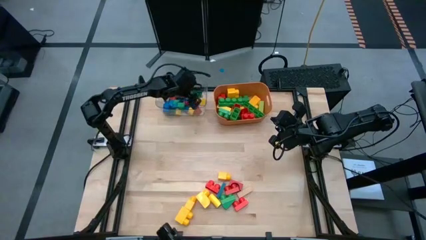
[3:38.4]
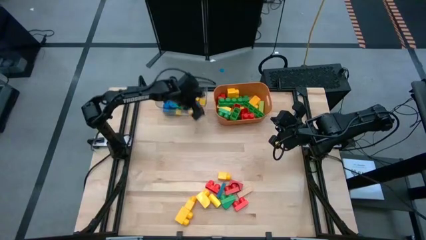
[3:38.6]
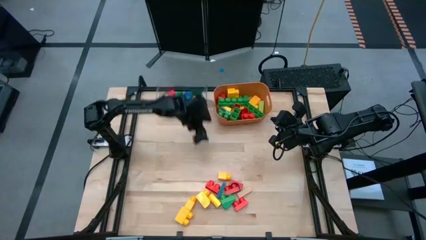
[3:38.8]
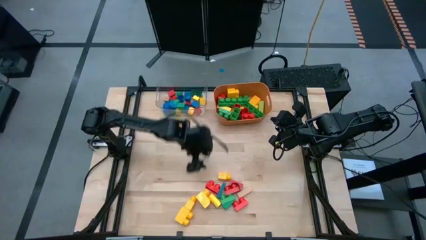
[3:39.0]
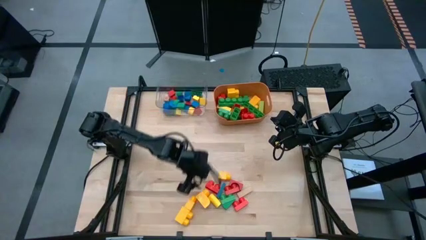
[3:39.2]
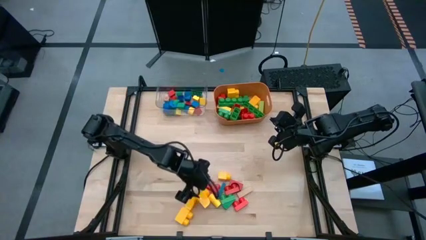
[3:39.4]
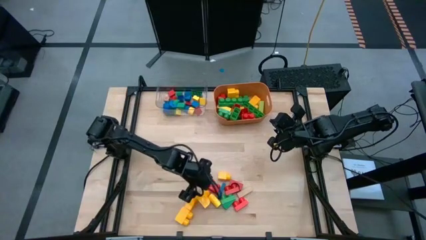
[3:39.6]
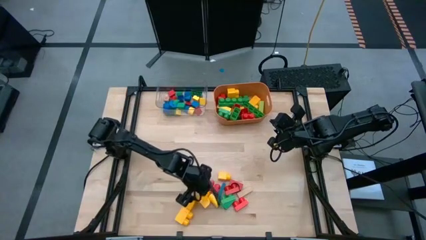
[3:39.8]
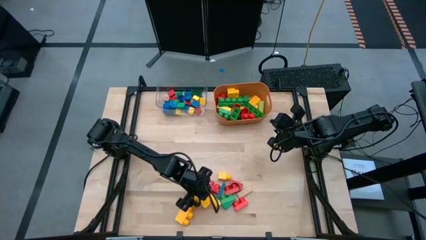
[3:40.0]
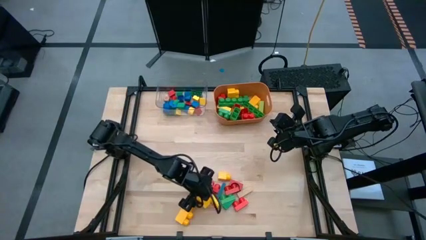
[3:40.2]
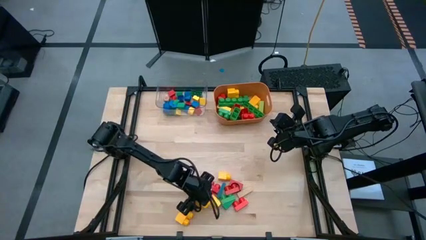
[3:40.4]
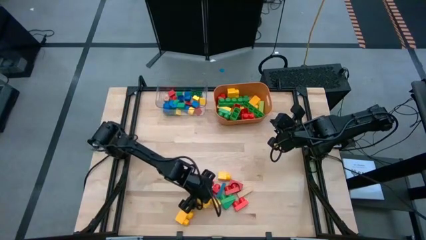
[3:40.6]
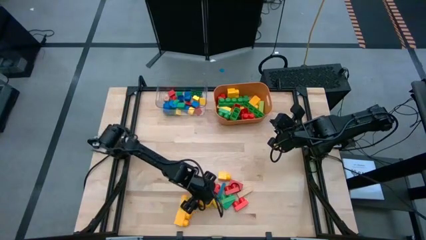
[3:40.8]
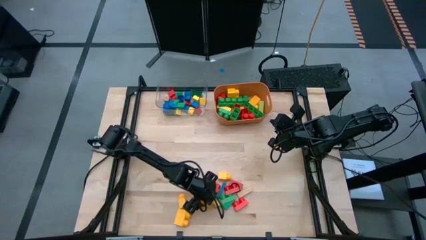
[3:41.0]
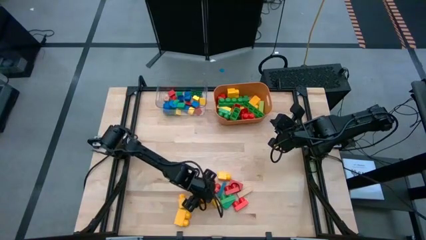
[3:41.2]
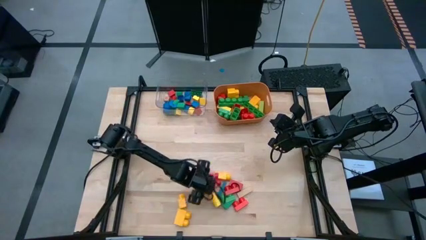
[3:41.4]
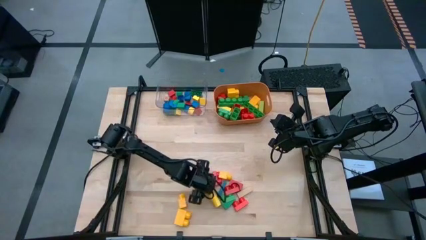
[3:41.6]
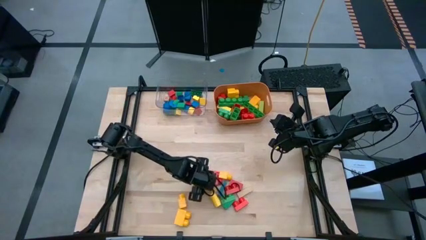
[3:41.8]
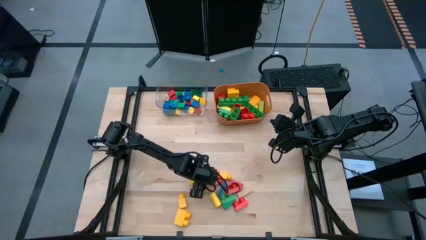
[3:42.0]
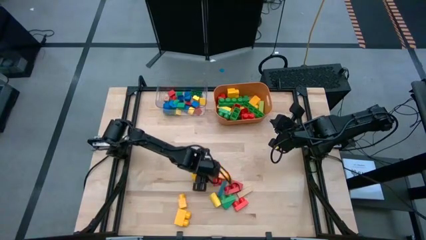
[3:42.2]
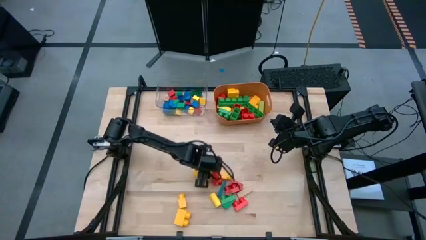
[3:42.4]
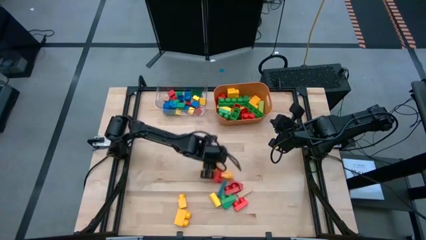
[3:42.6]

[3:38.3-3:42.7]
Task: Sort blocks by size
Put the big yellow game piece into the orange bin

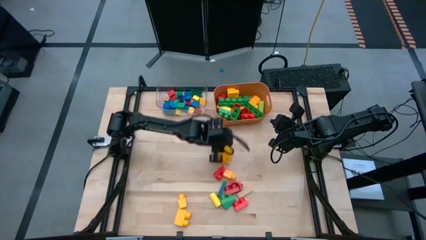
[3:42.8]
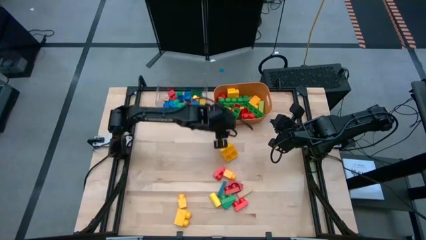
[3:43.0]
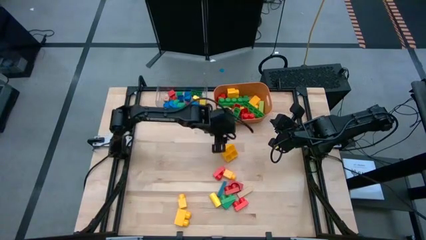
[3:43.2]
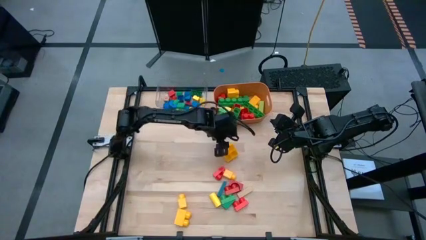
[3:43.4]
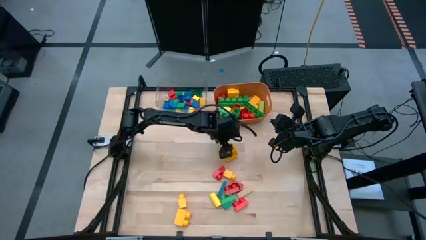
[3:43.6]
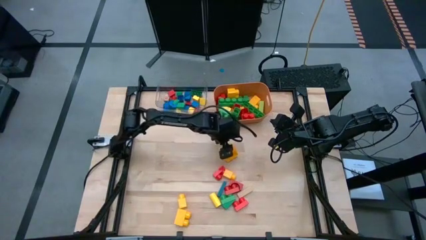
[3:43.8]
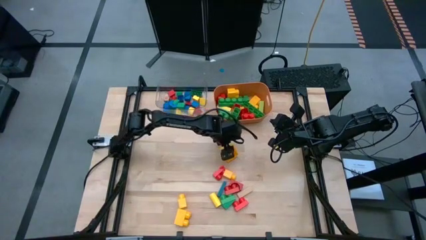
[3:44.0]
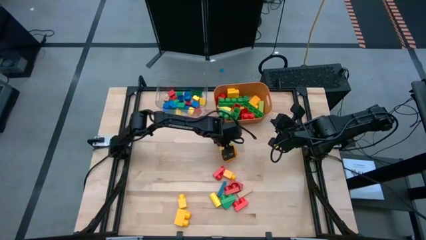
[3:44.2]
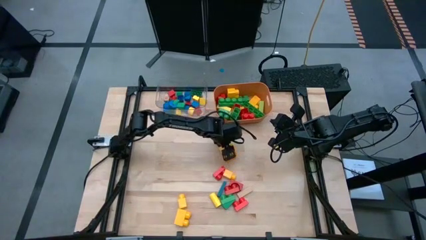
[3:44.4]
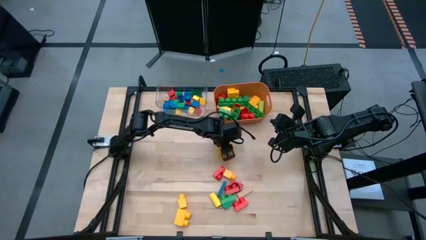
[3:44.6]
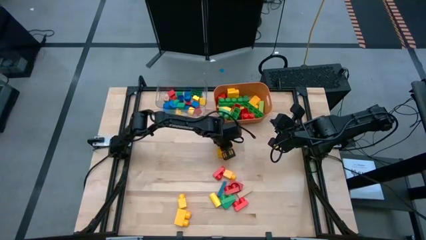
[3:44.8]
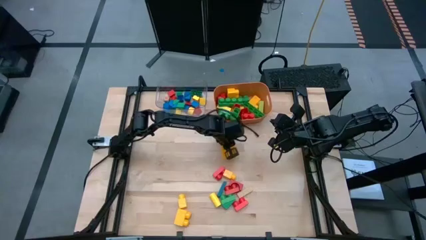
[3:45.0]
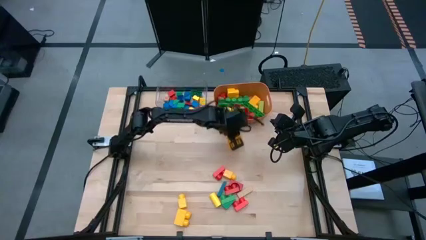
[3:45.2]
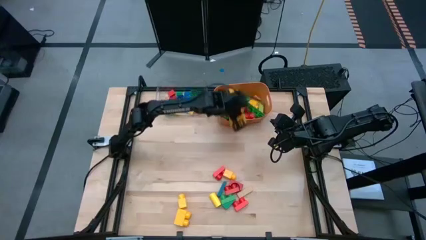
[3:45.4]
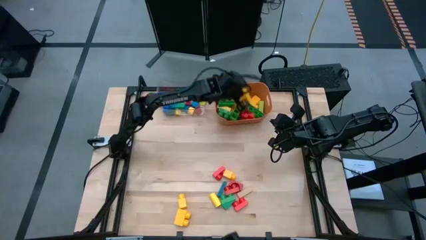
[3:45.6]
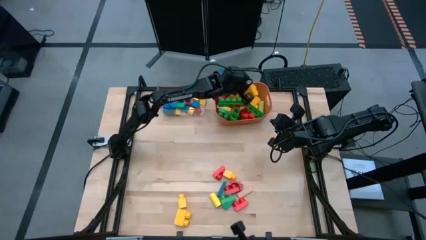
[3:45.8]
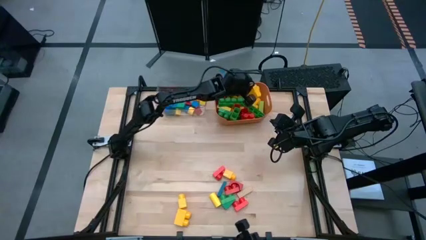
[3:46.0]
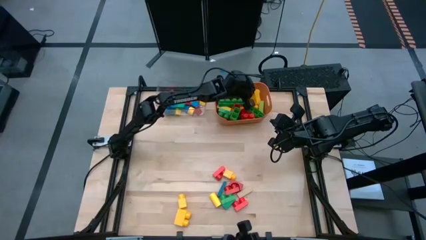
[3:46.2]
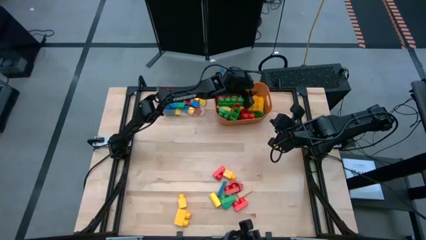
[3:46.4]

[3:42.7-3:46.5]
Put the big yellow game piece into the orange bin

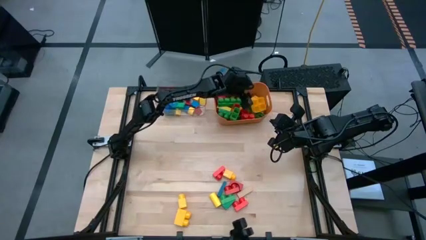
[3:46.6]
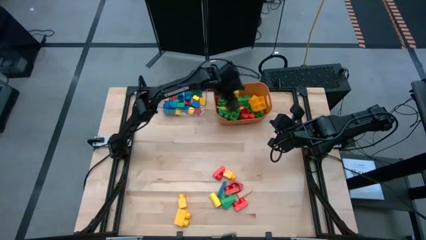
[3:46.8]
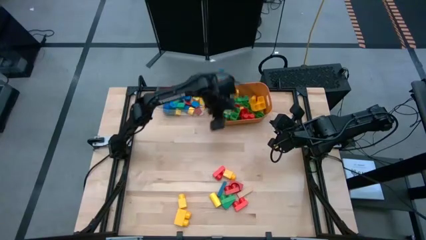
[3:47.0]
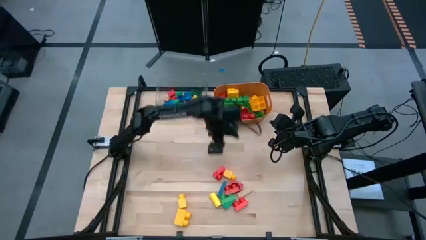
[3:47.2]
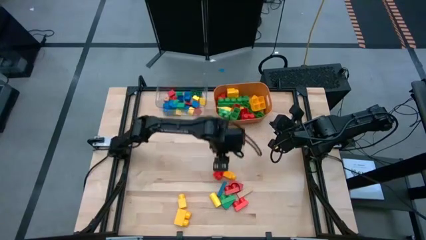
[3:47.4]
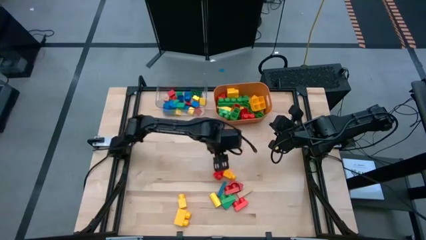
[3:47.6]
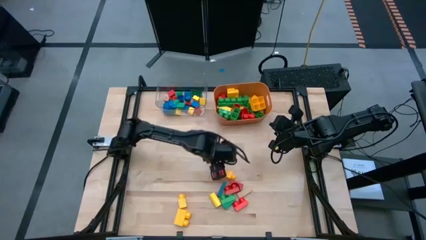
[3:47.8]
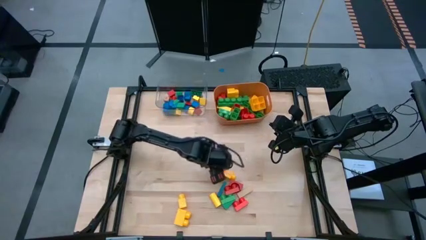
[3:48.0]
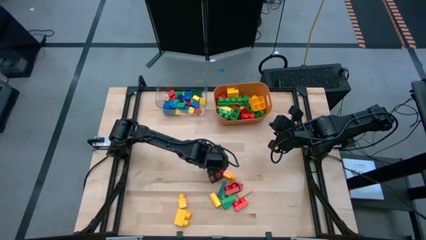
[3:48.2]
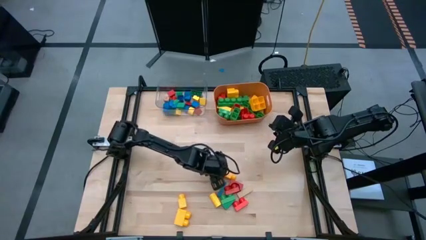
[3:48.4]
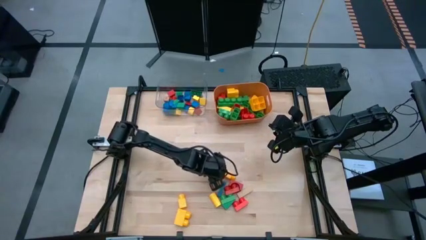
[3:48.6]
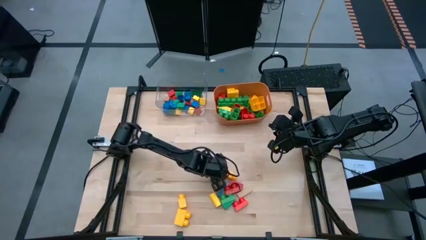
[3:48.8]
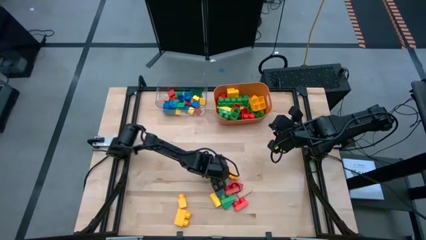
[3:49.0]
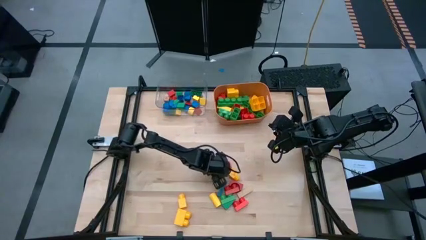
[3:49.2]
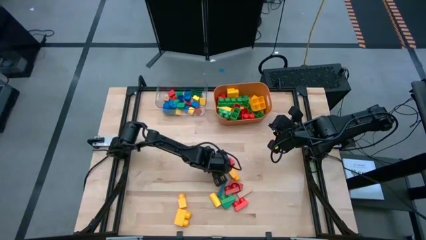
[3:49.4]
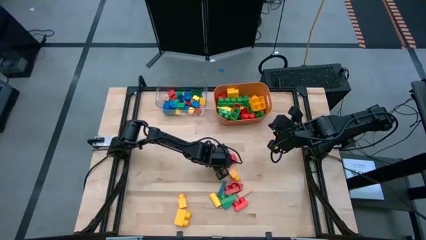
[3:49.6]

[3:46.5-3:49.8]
Put the big red game piece into the orange bin

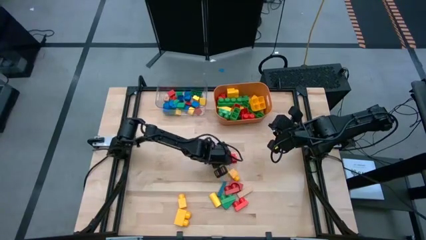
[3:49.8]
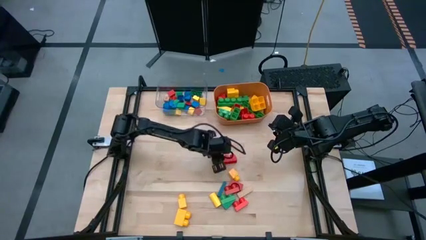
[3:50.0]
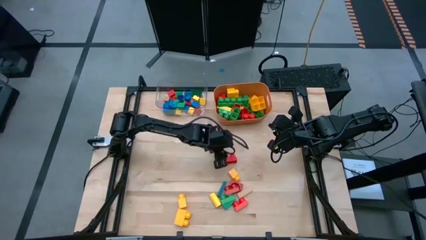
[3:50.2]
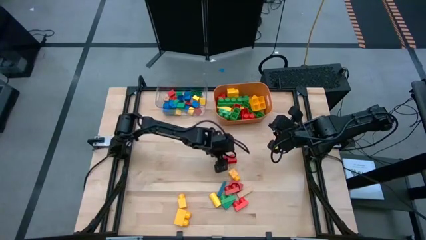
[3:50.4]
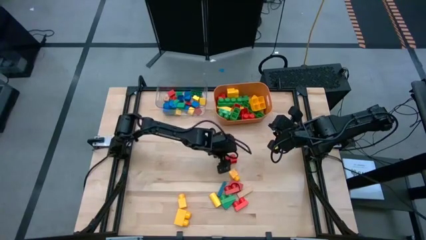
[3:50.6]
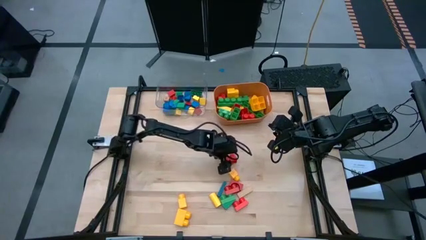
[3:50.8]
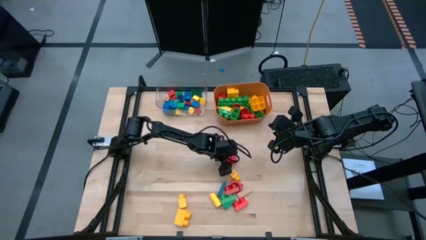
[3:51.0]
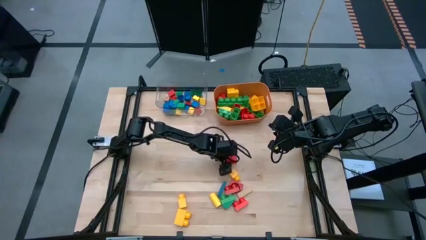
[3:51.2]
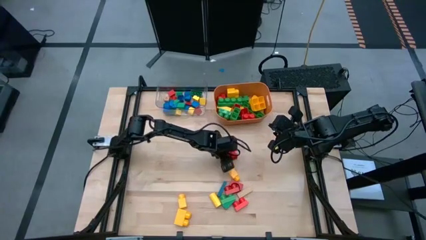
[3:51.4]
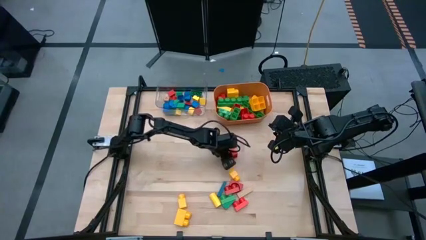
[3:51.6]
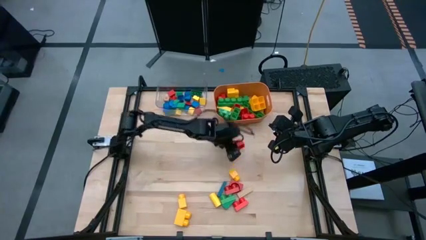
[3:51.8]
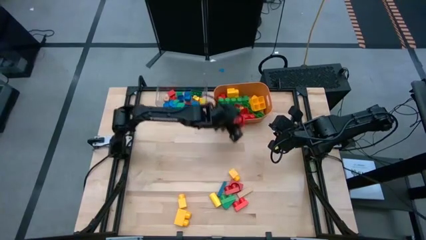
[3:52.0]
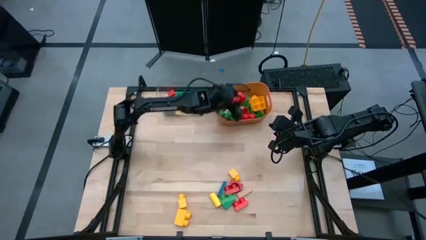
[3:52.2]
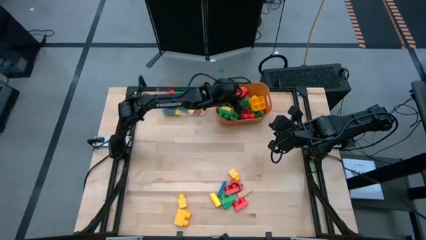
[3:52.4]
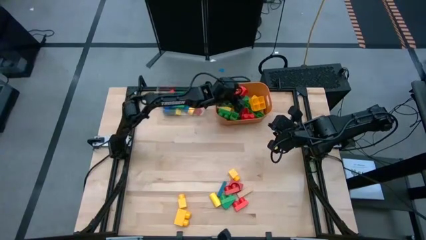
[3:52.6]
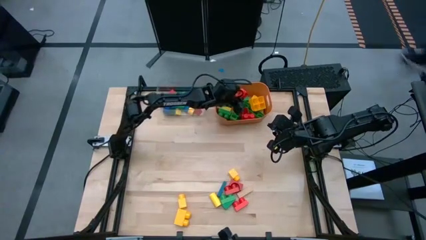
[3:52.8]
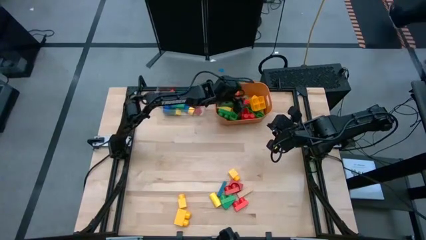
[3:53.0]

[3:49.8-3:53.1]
Put the big red game piece into the orange bin

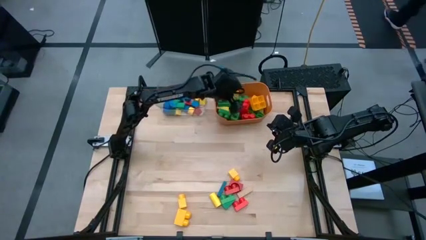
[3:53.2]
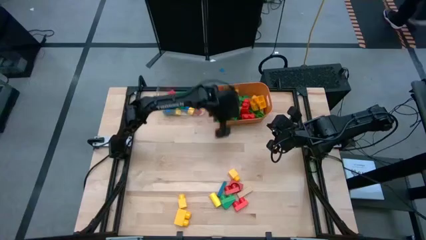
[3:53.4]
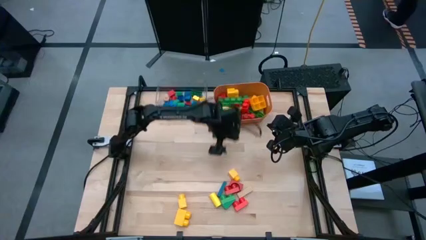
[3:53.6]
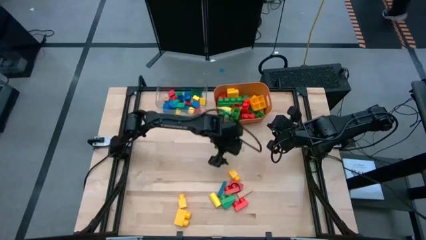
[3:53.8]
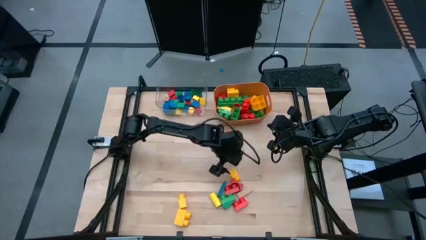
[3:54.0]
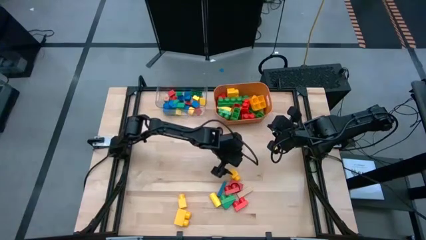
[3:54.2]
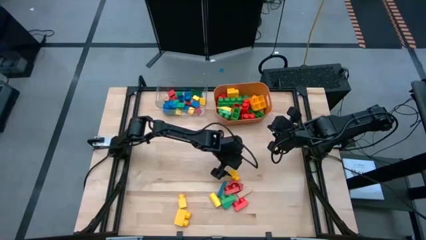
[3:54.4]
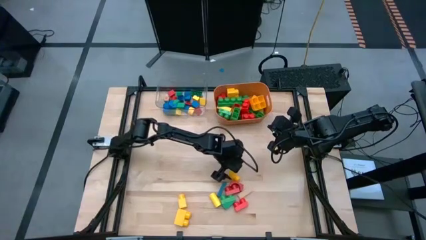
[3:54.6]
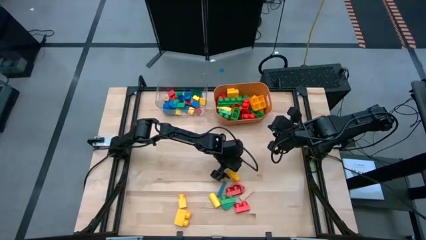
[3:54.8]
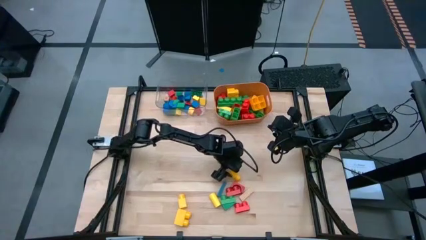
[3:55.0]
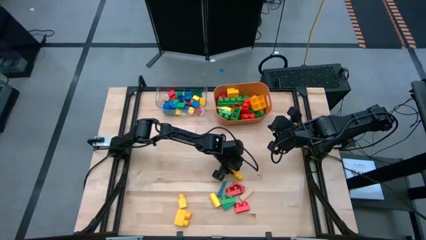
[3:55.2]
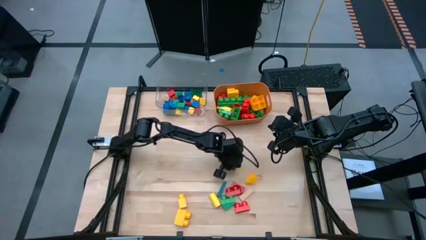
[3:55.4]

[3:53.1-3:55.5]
Put the big yellow game piece into the orange bin
